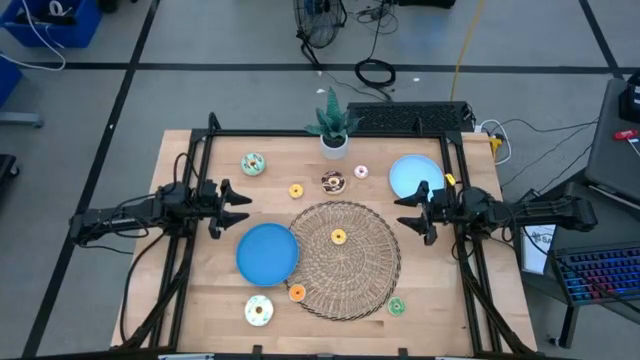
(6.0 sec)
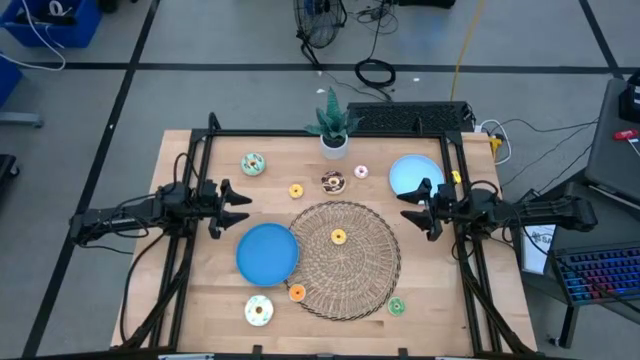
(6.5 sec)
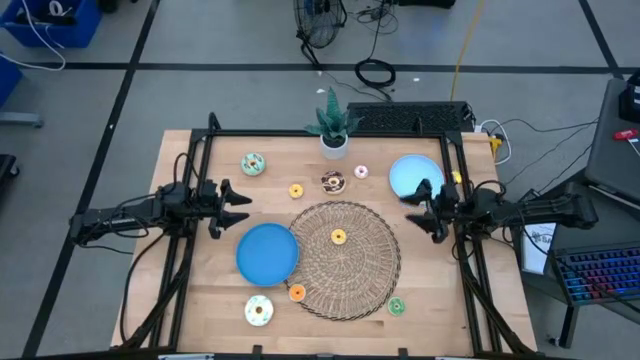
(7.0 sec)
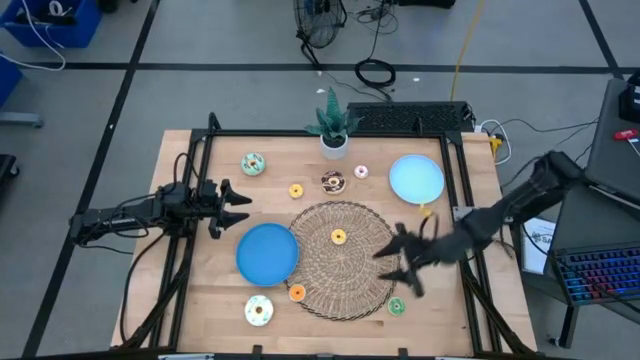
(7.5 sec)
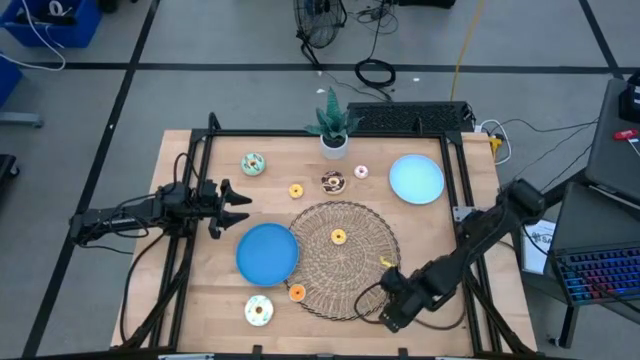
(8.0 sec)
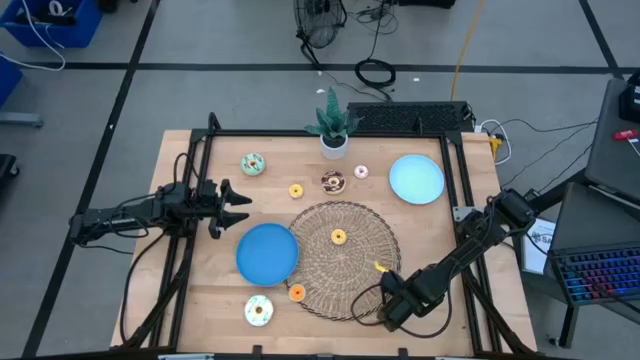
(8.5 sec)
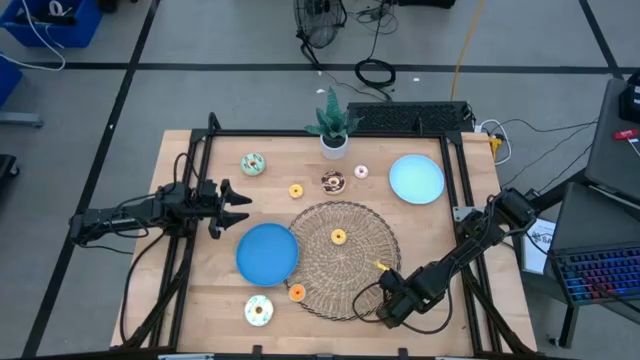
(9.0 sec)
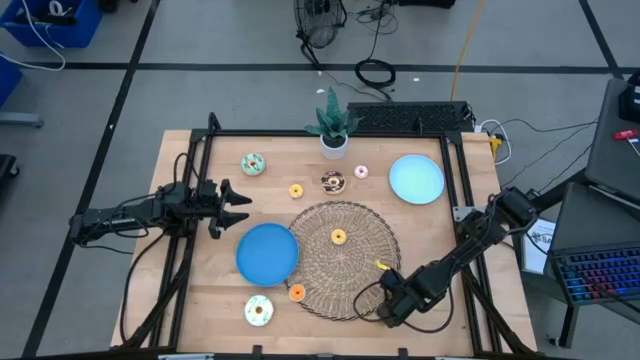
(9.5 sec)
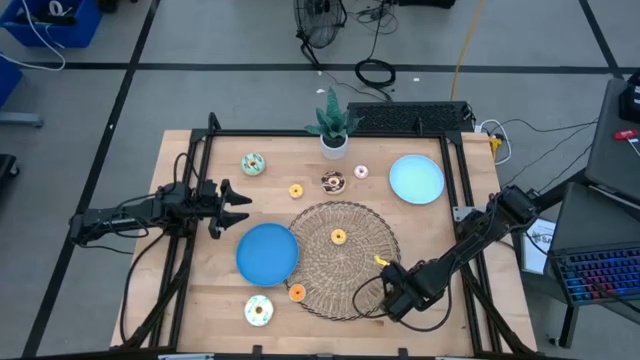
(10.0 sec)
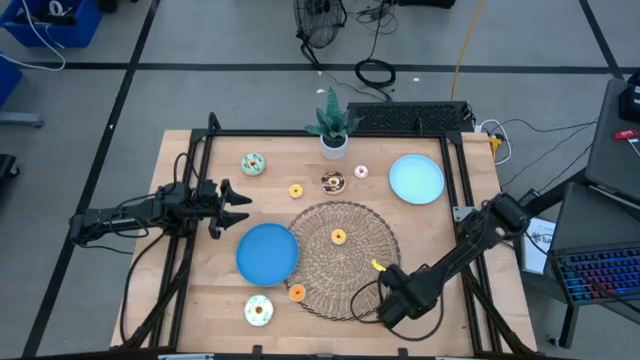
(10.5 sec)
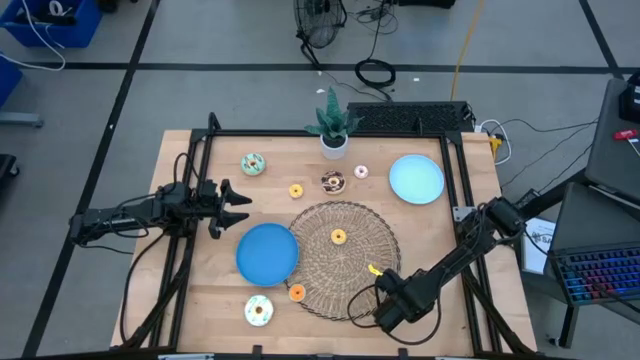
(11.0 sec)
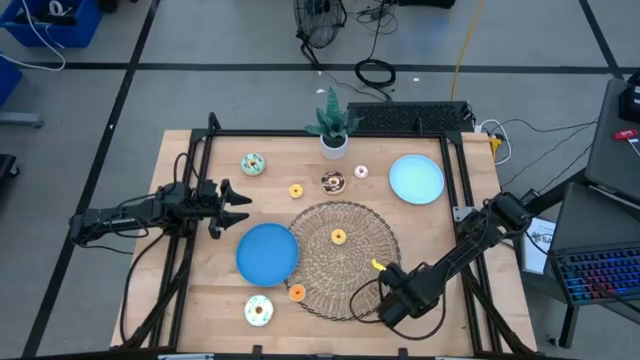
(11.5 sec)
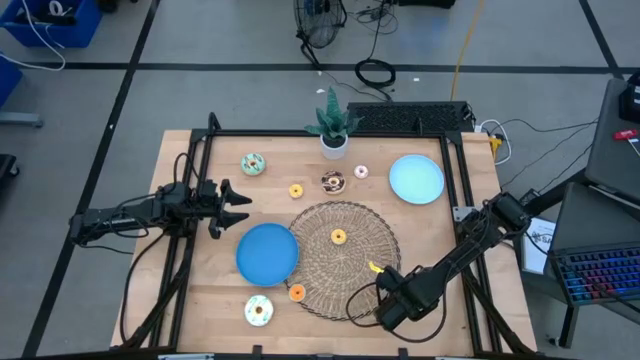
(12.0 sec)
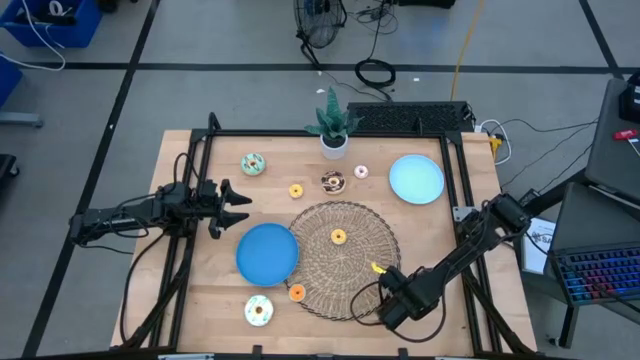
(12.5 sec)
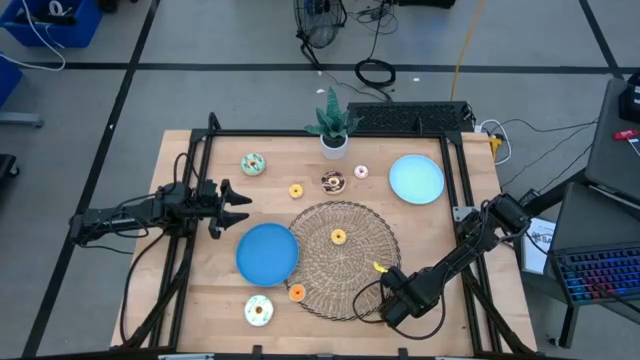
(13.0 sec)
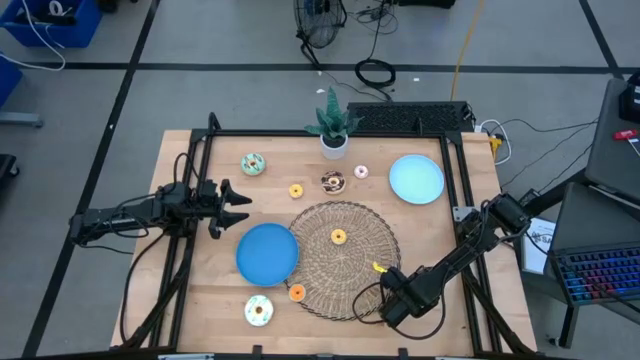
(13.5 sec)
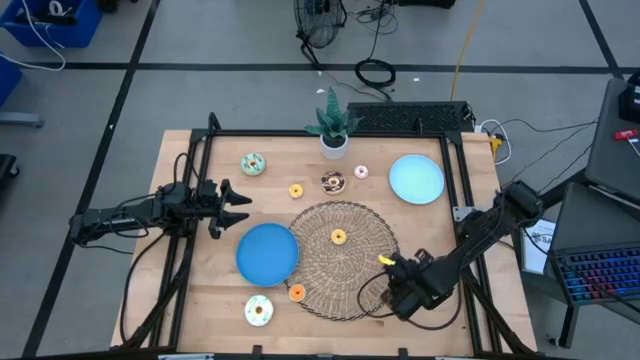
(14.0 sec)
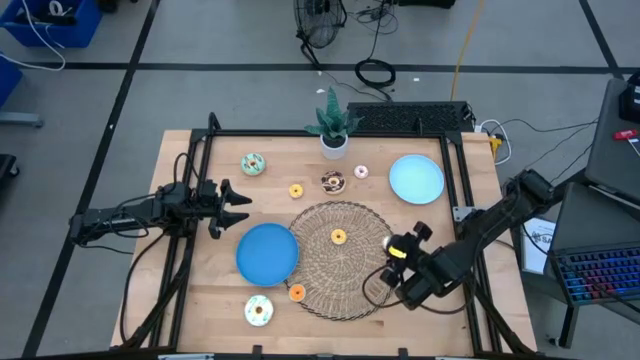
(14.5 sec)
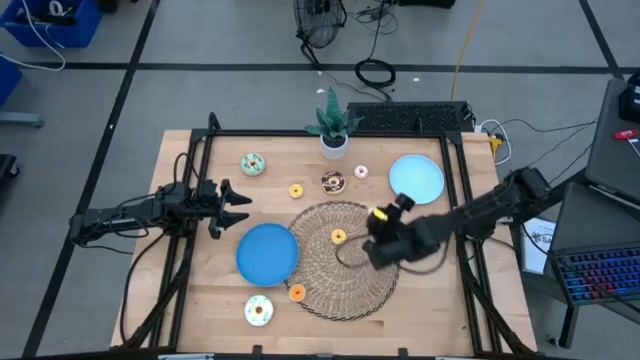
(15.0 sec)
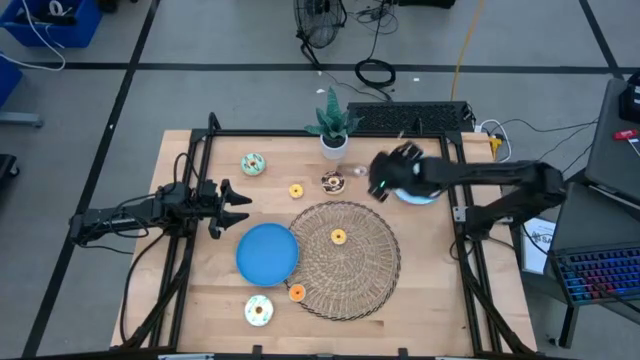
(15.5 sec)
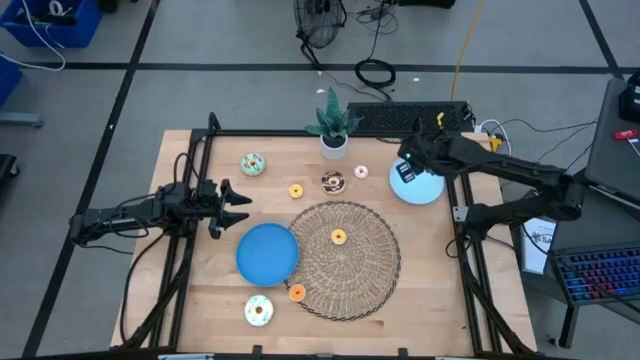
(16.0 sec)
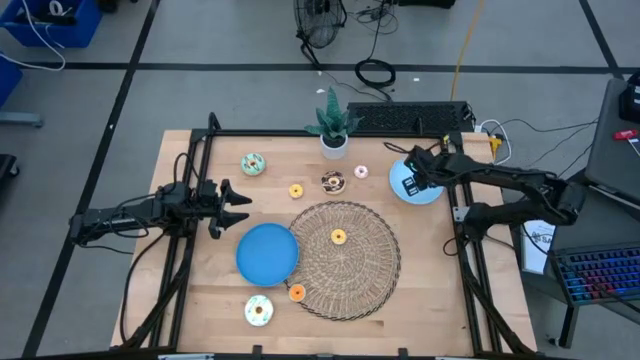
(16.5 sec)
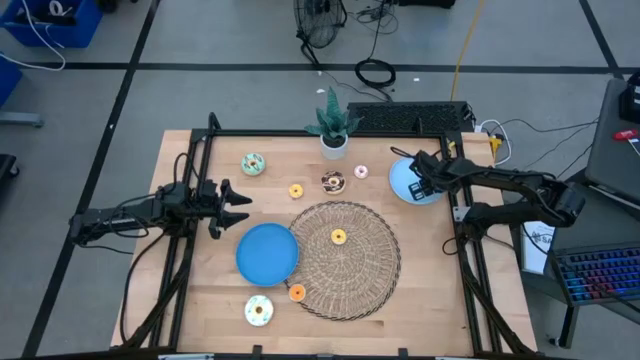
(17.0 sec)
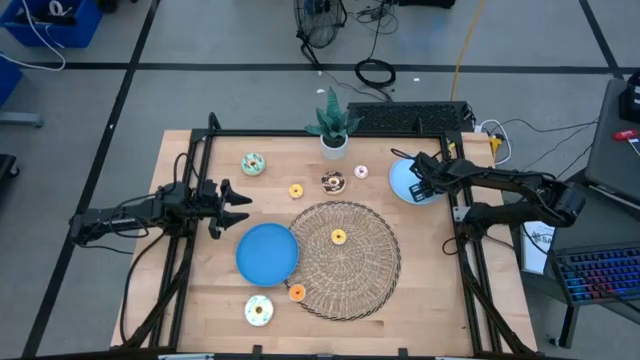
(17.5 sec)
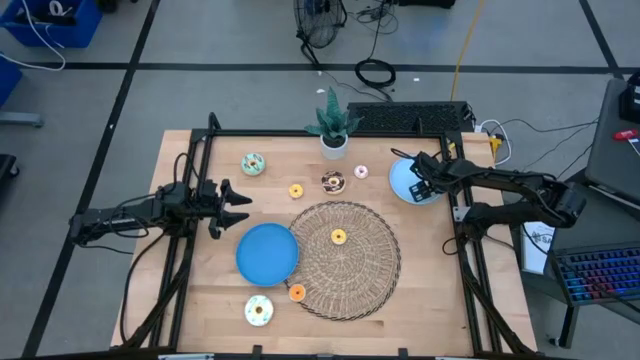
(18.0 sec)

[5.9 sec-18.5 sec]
Task: Pick & Place donuts
Put the small green donut on the light blue plate

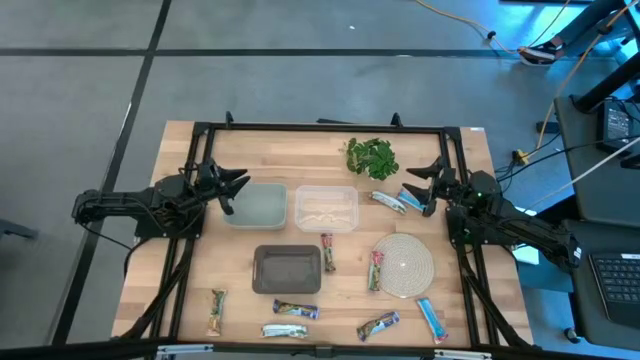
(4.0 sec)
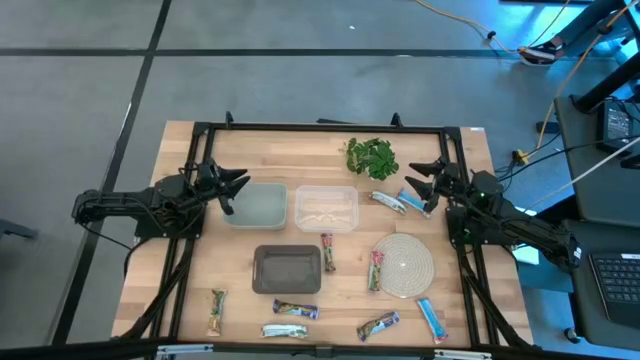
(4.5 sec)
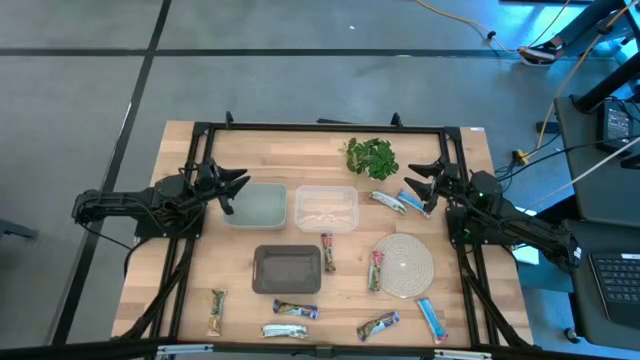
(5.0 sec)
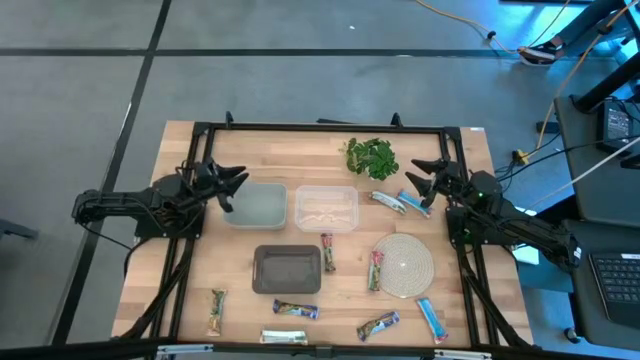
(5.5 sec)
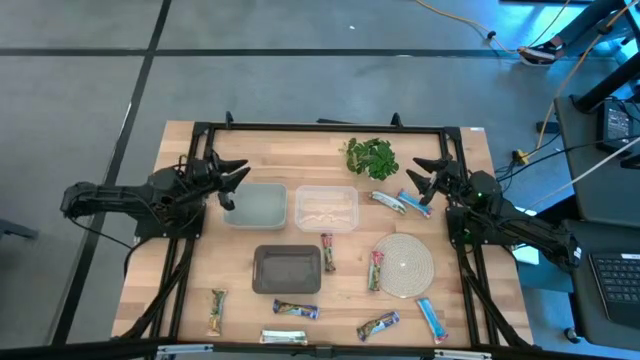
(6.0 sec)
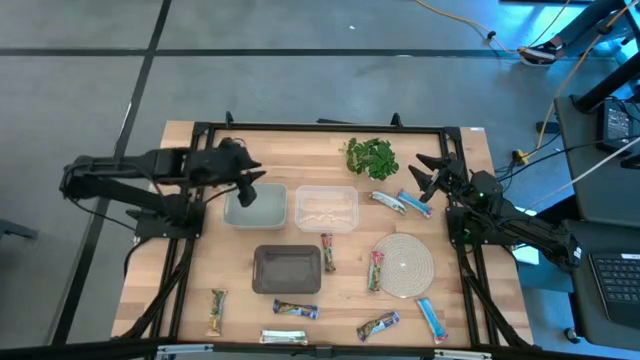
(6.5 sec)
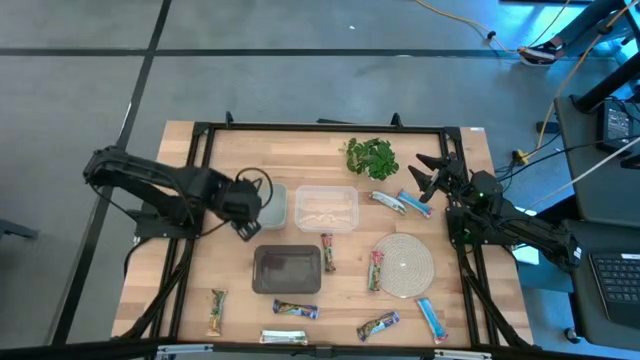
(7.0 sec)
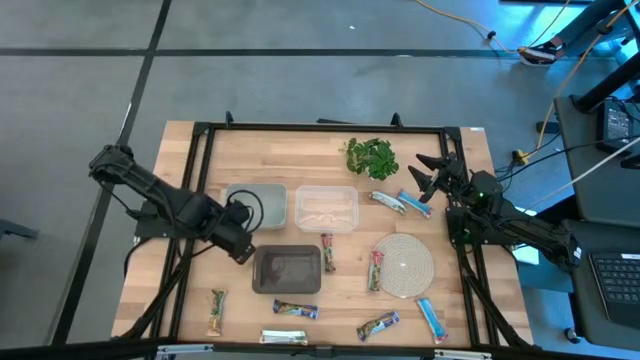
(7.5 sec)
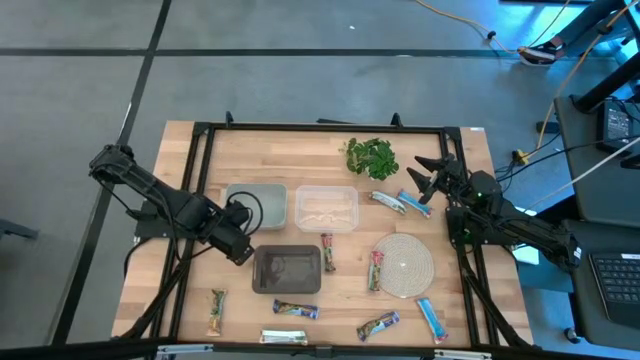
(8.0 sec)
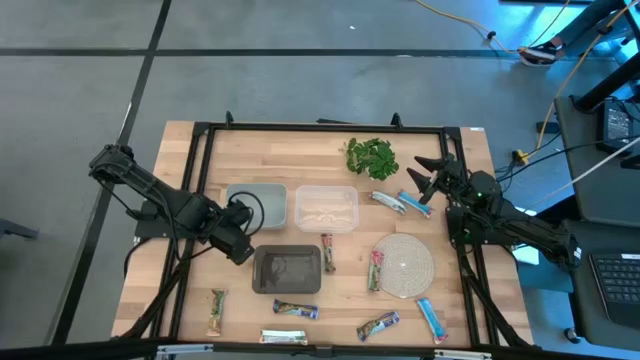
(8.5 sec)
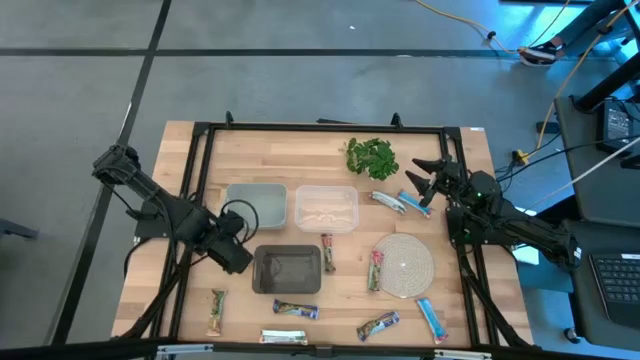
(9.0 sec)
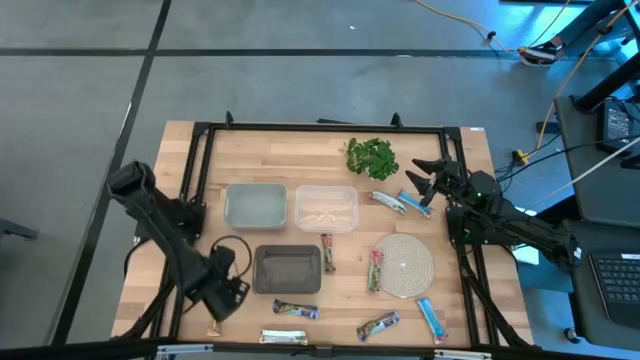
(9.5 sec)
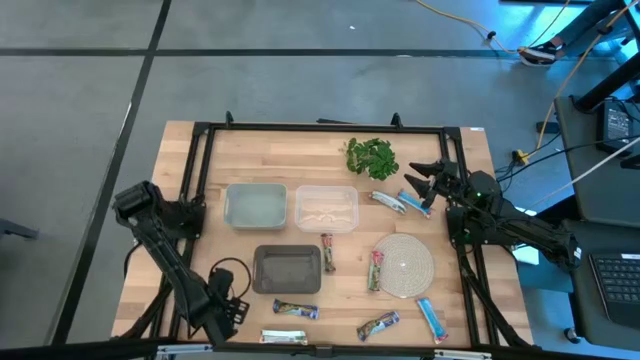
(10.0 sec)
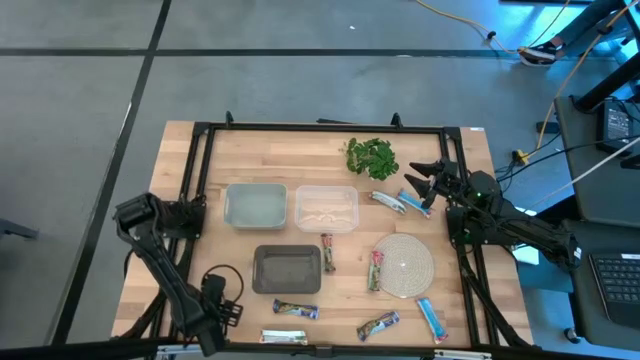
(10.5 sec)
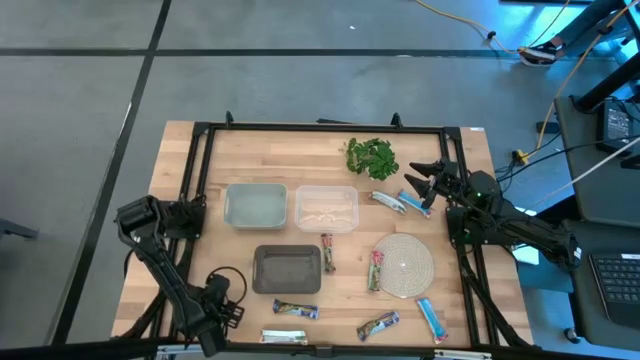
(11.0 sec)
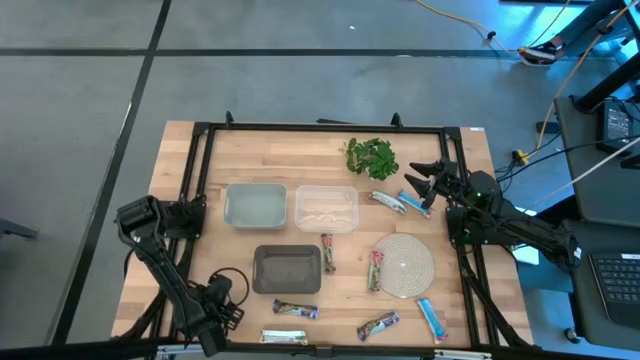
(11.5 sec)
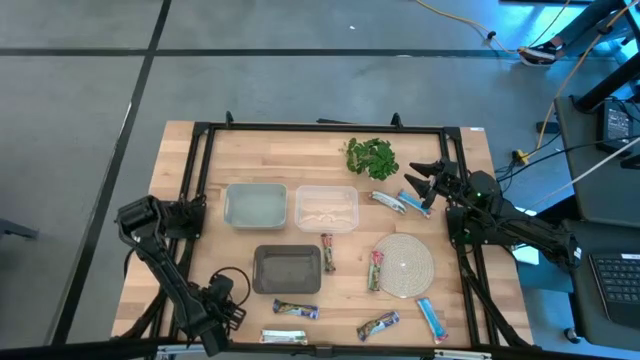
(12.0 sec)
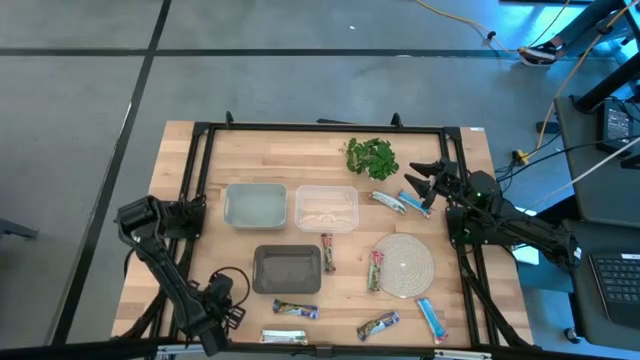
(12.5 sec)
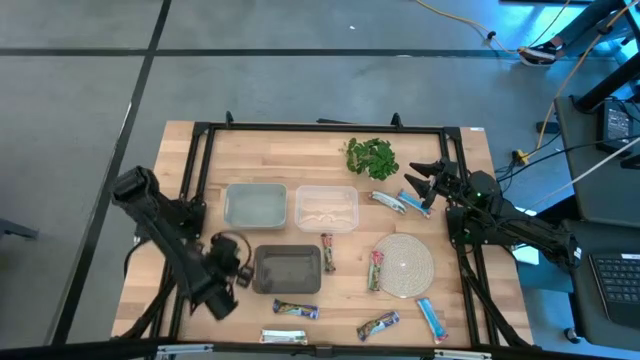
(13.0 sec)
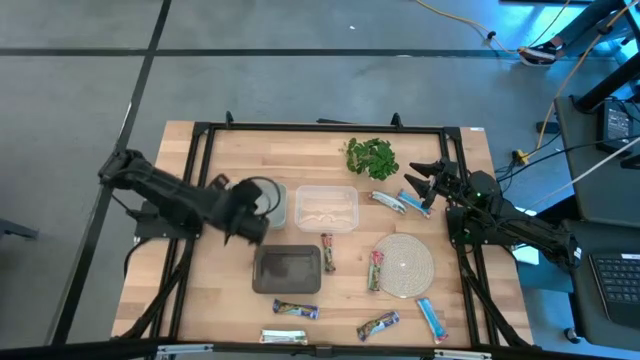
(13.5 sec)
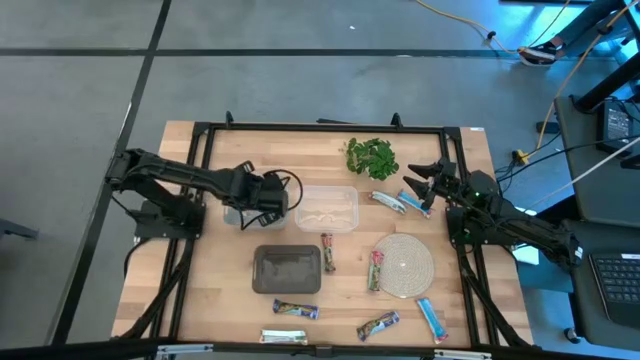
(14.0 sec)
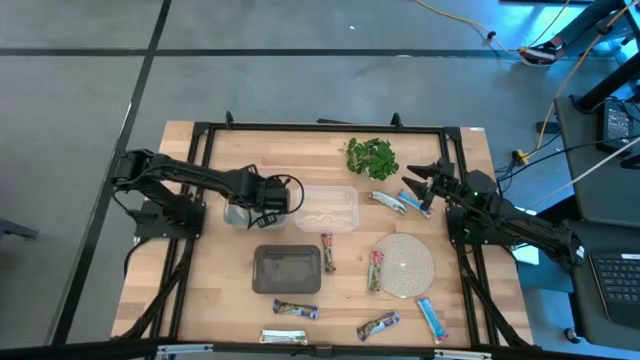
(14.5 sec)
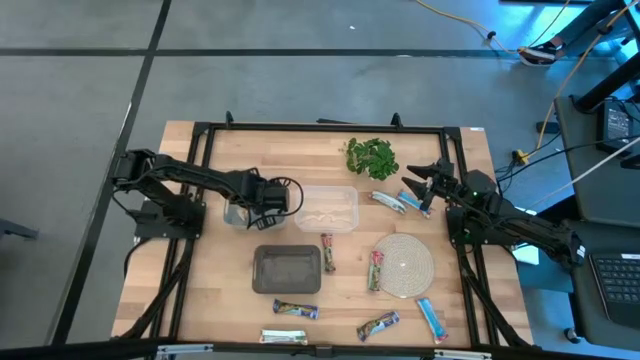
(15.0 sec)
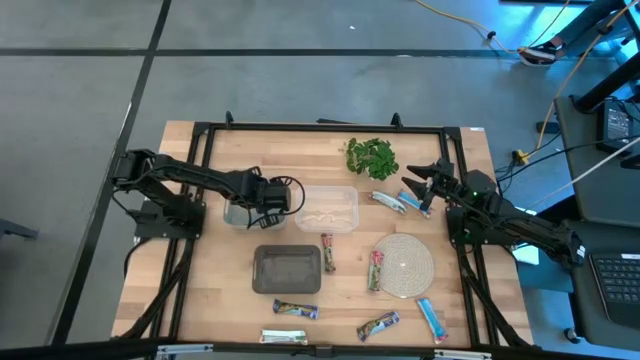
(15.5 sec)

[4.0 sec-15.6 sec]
Task: Pick and place Granola Bars by type
Put the yellow granola bar into the gray bin
